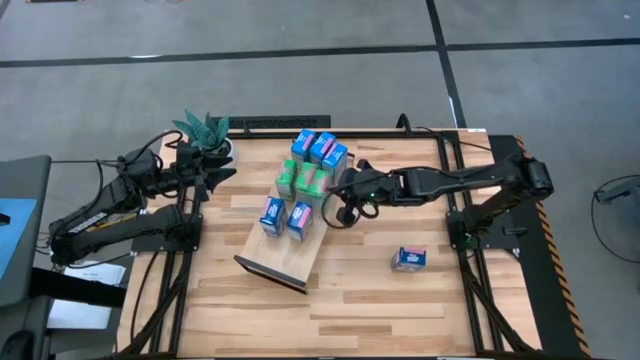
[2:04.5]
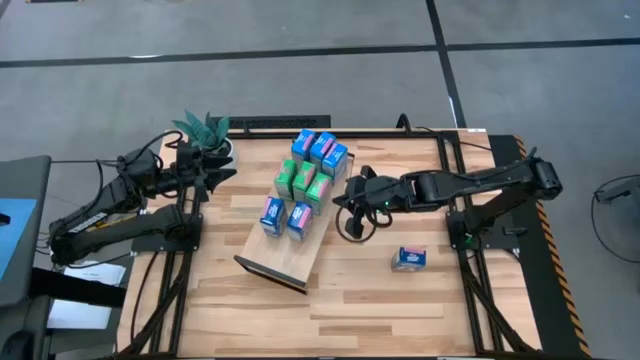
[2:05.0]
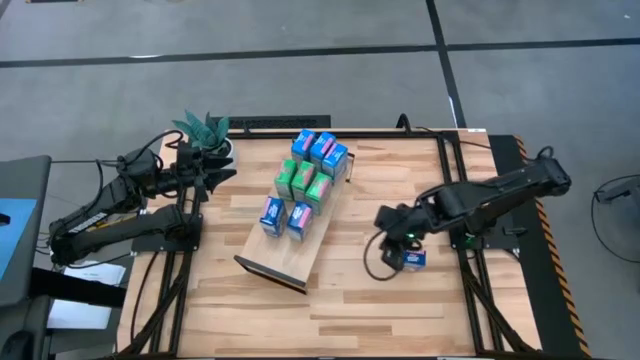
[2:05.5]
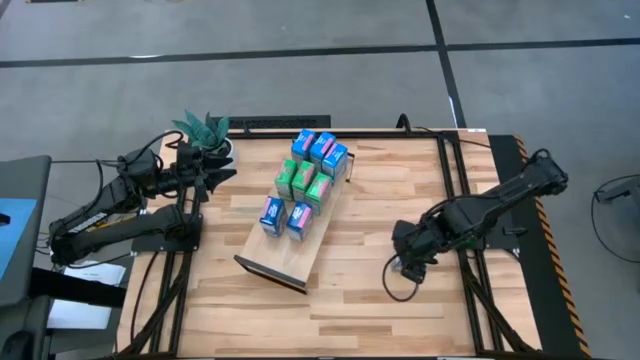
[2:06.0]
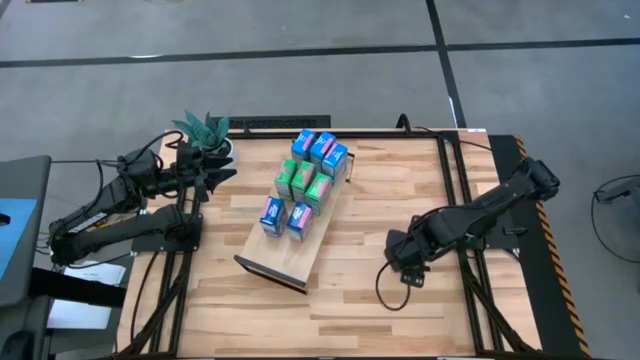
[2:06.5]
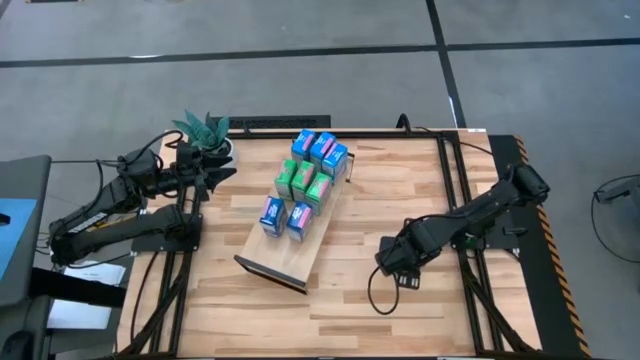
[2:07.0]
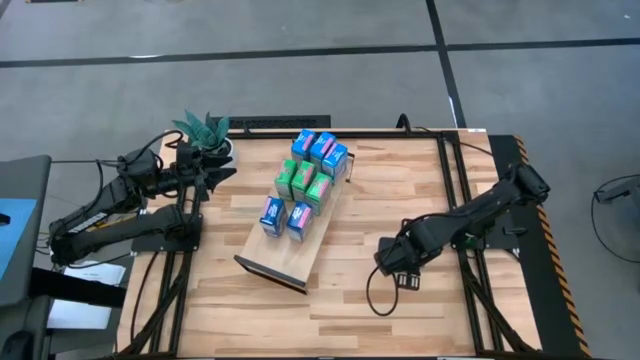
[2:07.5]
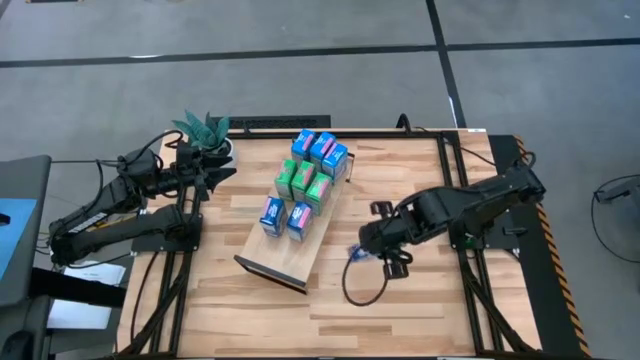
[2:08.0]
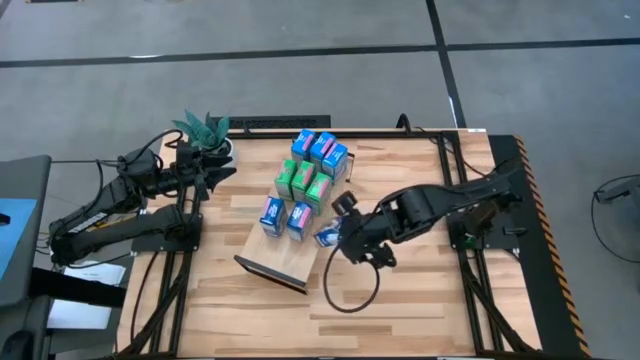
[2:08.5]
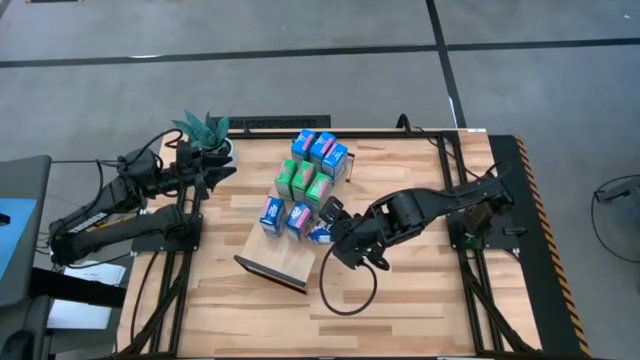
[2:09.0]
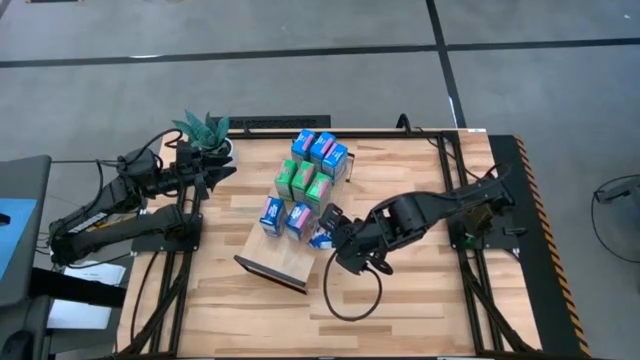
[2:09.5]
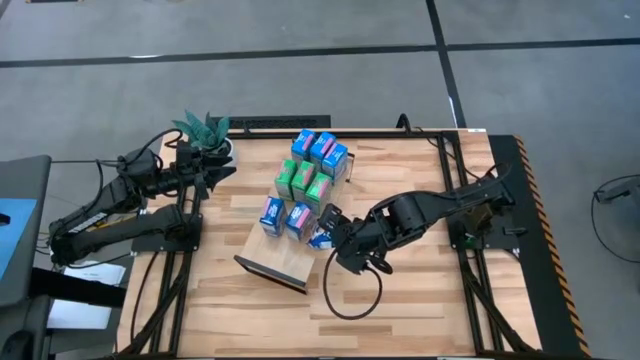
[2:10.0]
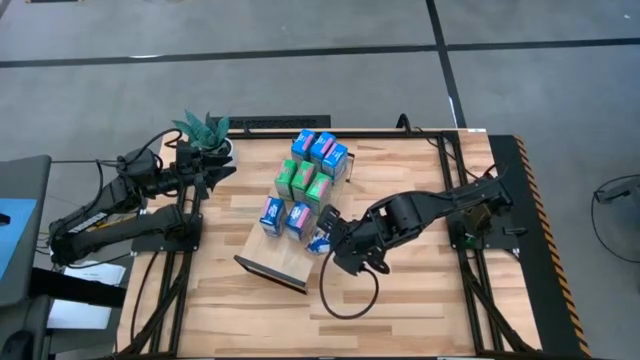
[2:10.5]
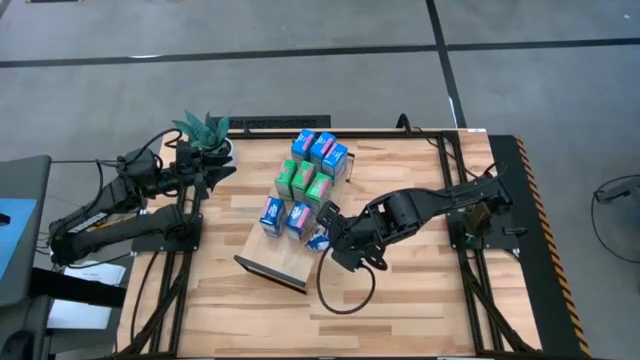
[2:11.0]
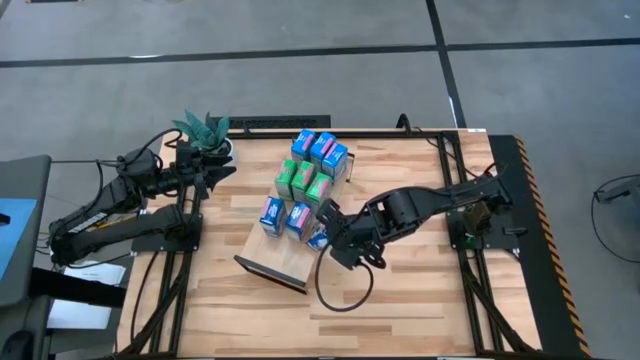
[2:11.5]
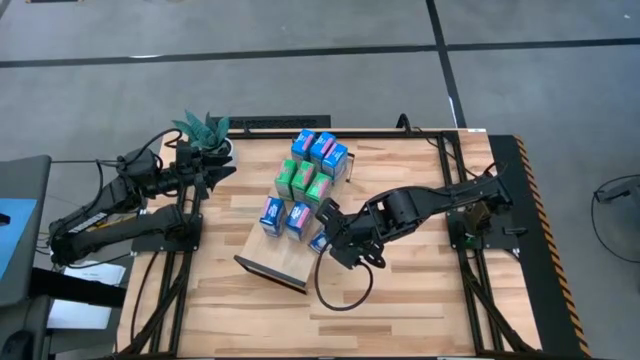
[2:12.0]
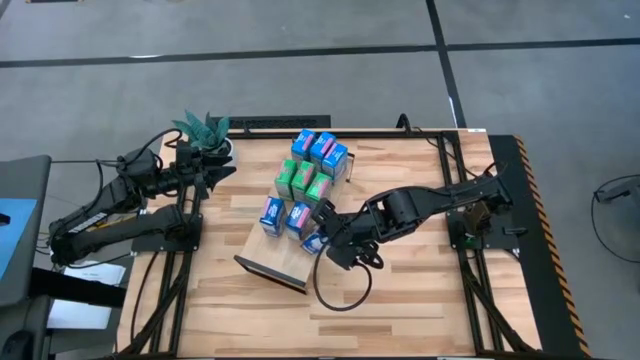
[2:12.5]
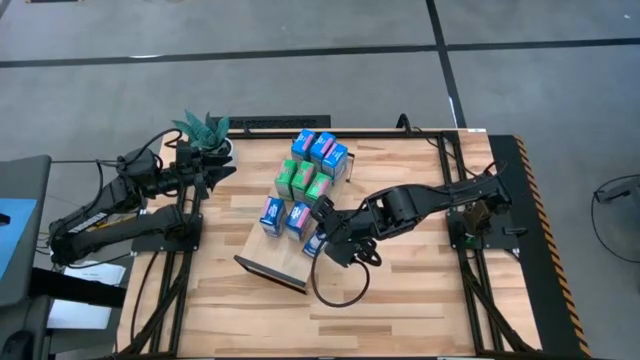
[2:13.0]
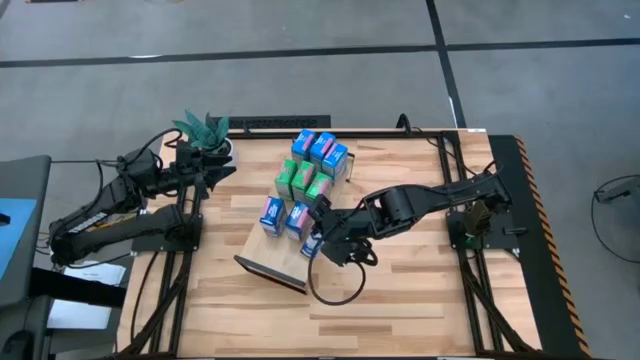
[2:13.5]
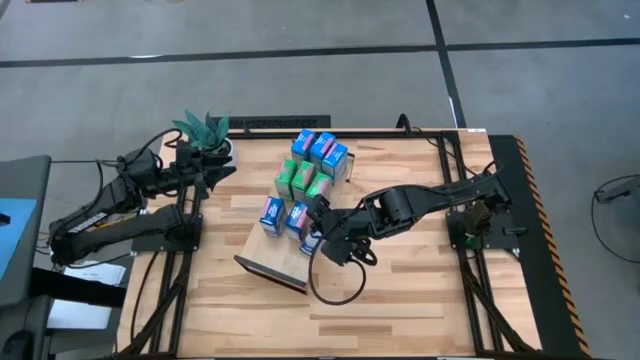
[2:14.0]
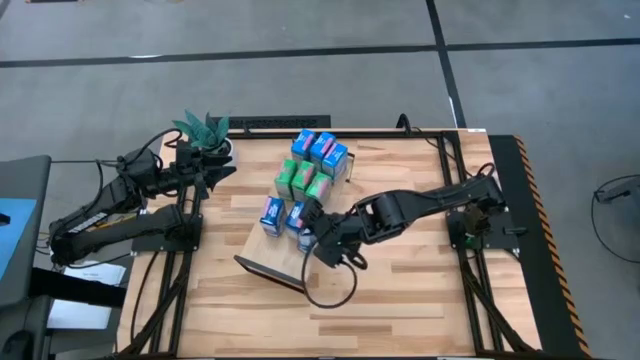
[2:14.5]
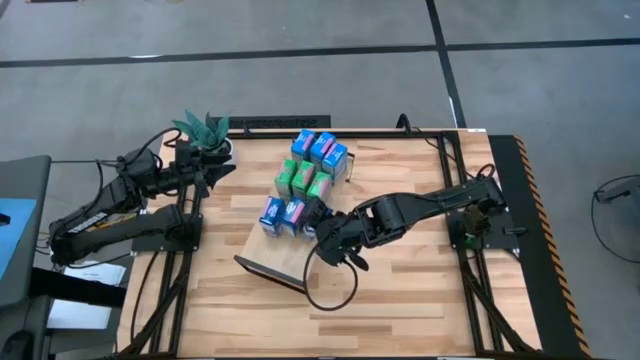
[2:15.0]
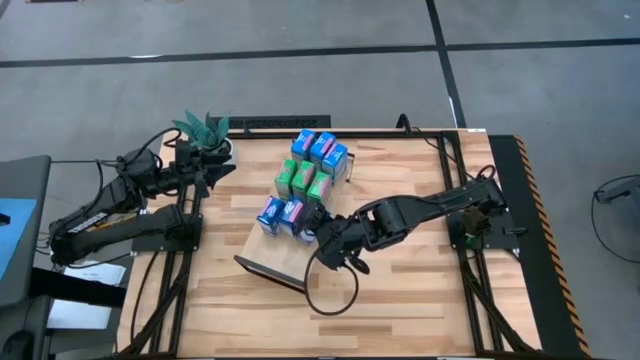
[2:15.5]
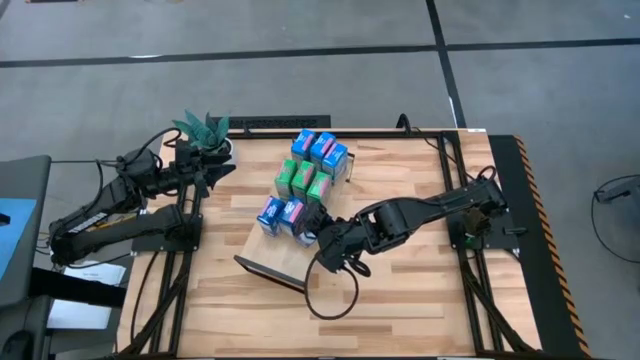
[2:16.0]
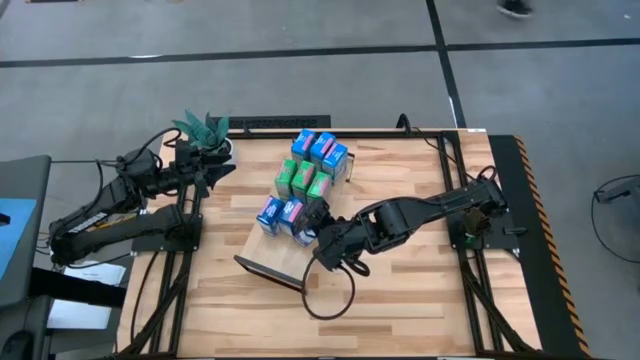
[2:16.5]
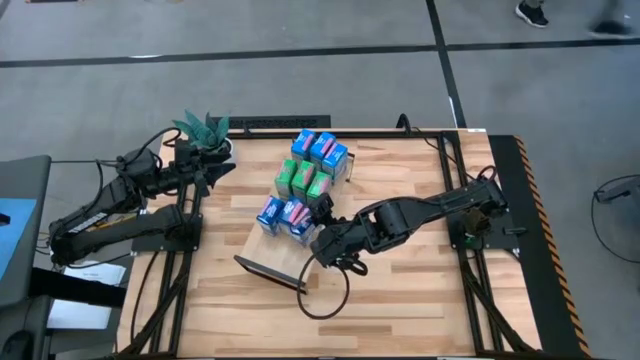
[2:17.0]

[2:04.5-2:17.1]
Task: Stack cereal on shelf
Put the blue cereal box on the shelf aligned with the other blue cereal boxes

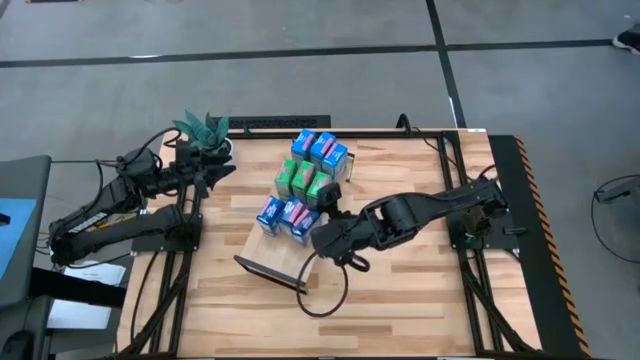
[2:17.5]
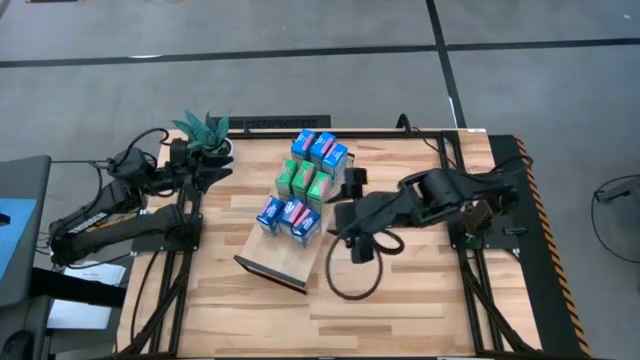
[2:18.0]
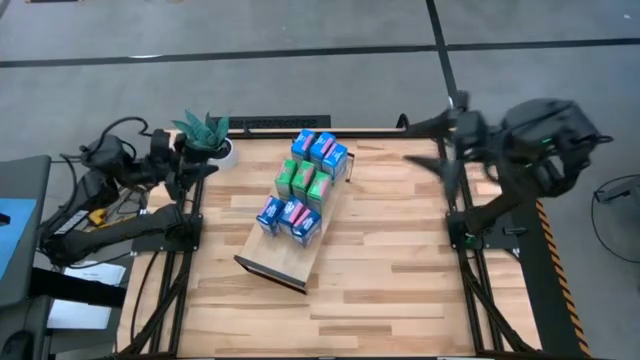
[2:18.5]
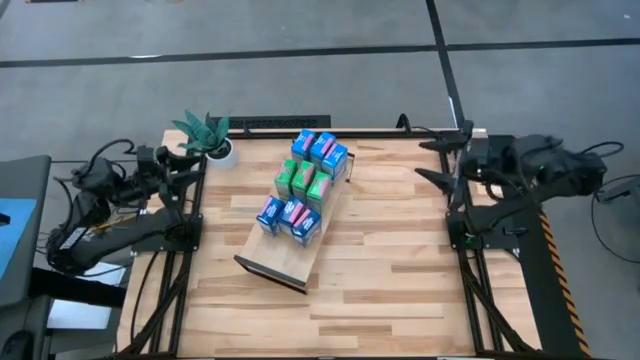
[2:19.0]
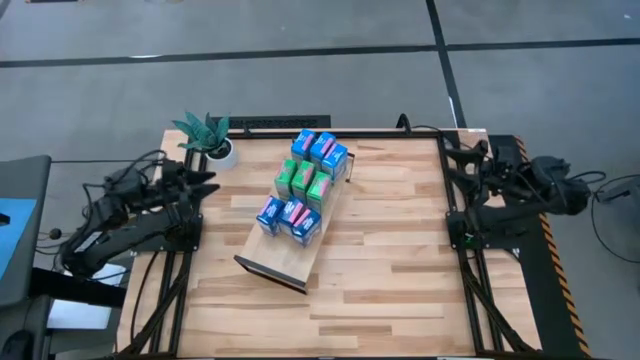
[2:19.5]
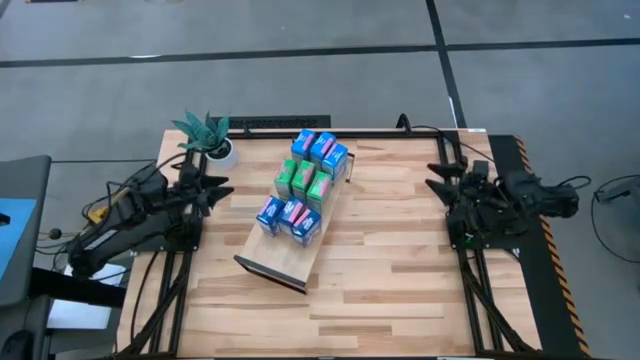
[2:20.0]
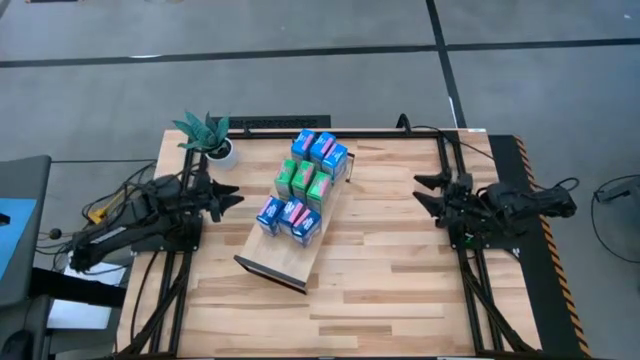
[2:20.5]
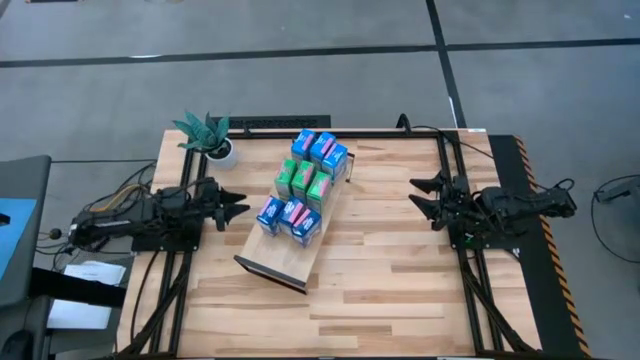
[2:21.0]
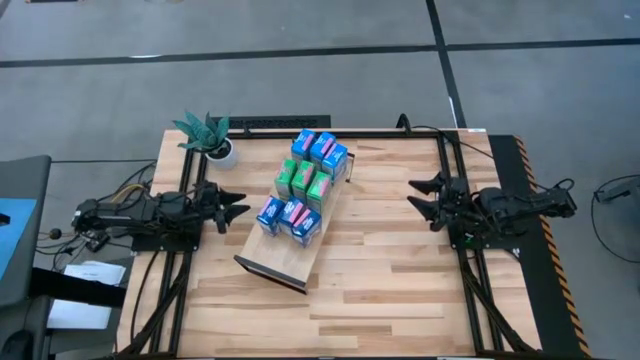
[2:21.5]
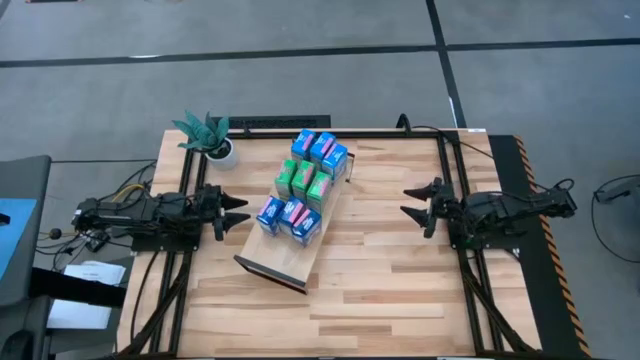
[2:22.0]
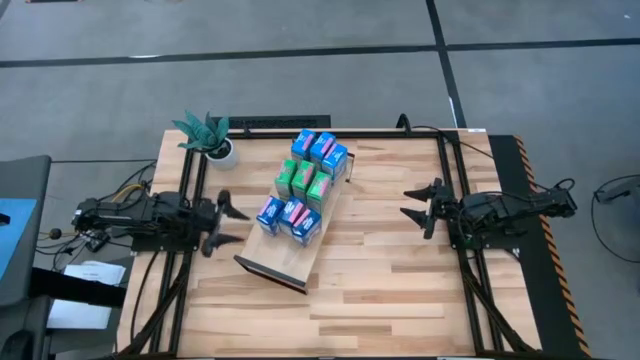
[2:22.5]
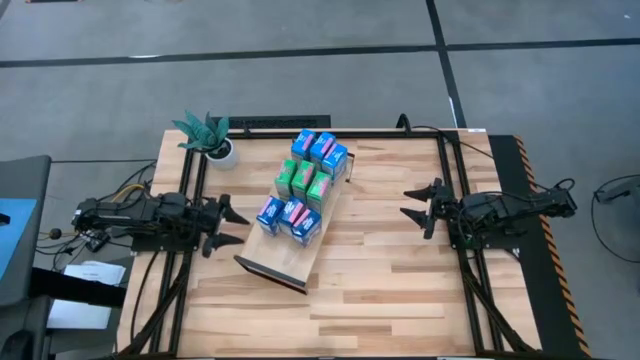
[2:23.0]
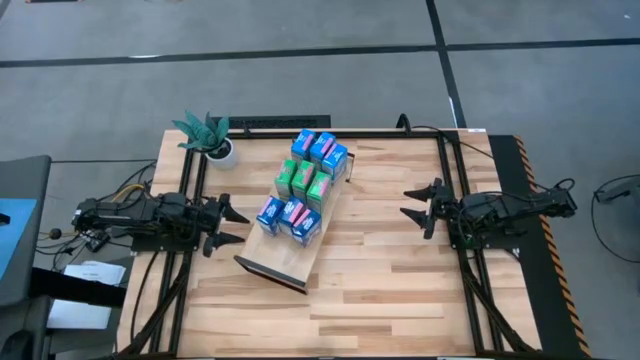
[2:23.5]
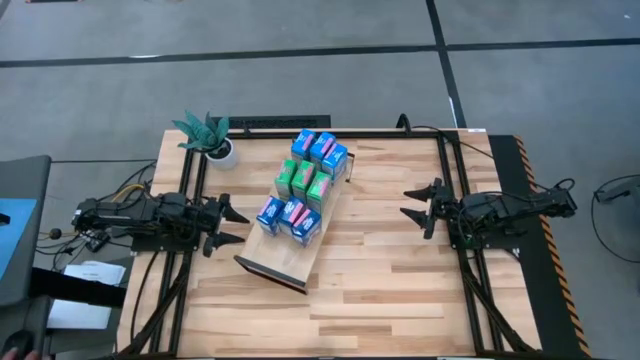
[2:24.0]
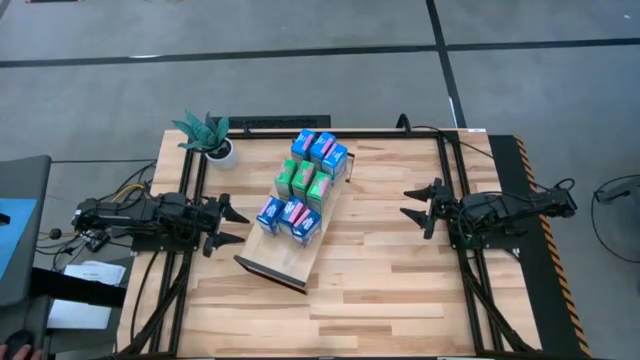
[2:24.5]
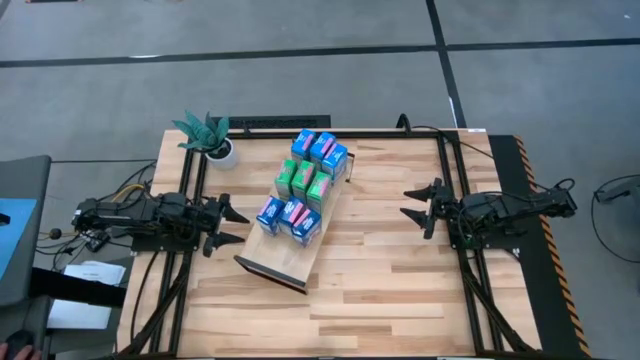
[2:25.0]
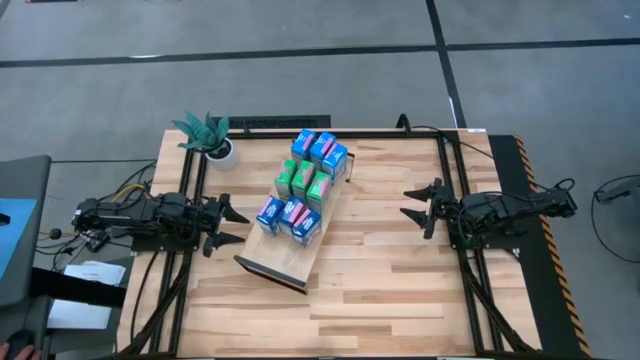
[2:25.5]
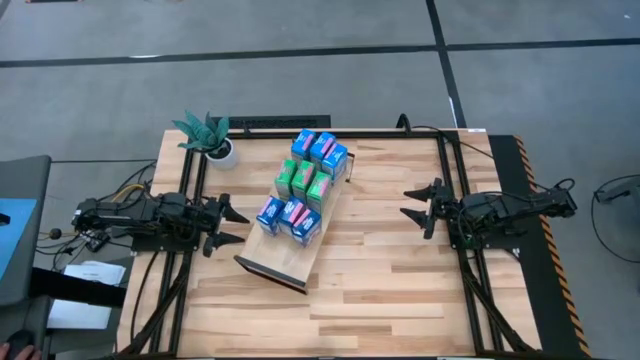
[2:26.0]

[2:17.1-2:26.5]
Return to Home Position
